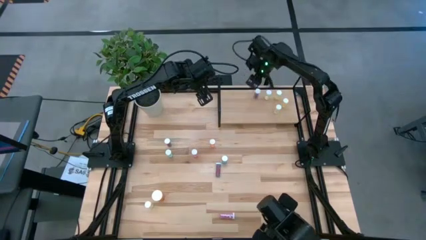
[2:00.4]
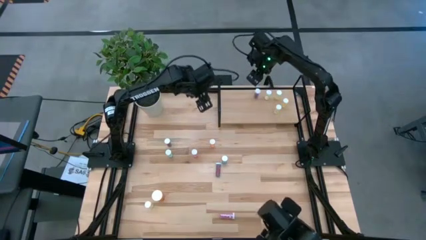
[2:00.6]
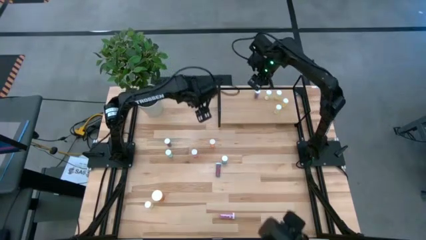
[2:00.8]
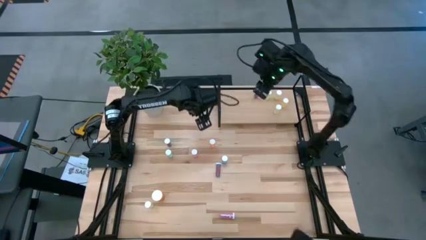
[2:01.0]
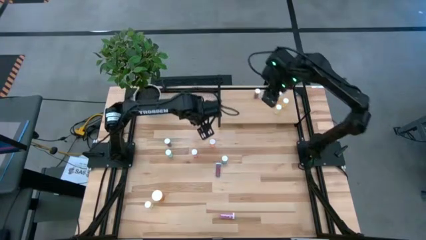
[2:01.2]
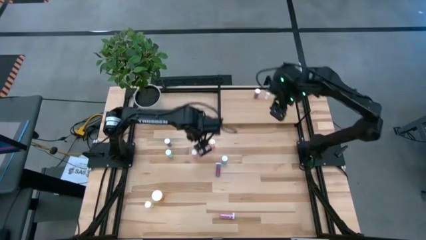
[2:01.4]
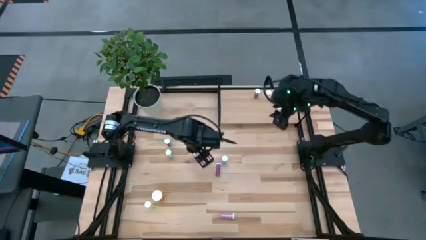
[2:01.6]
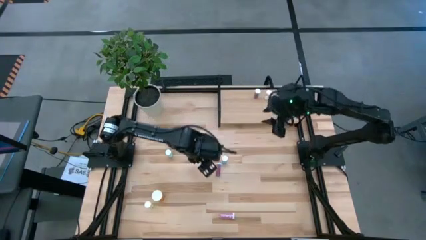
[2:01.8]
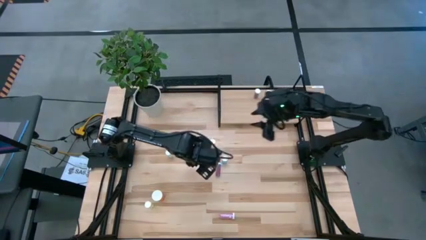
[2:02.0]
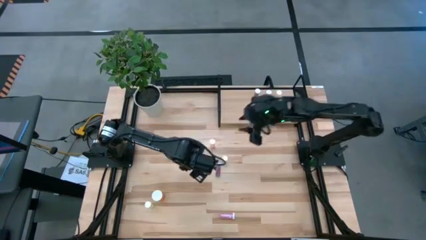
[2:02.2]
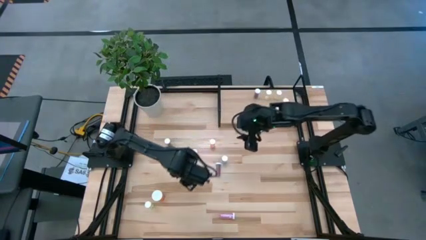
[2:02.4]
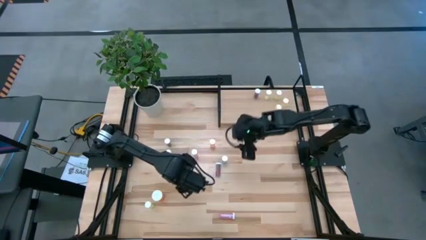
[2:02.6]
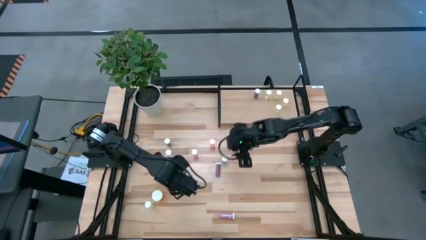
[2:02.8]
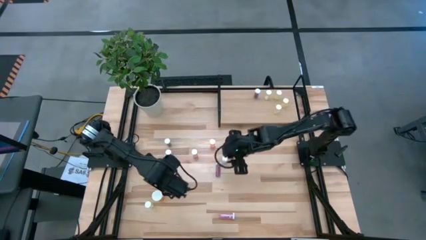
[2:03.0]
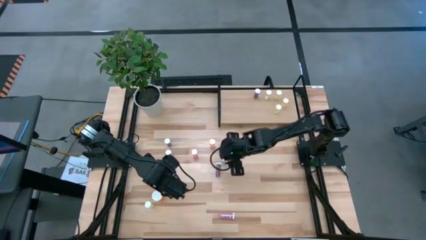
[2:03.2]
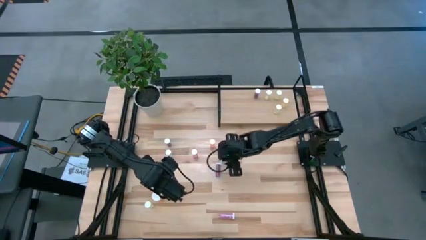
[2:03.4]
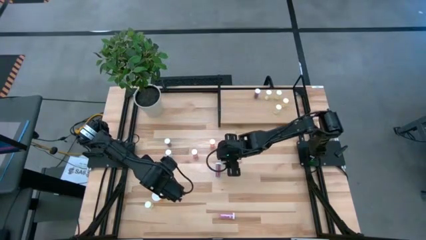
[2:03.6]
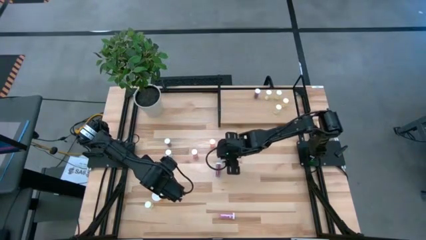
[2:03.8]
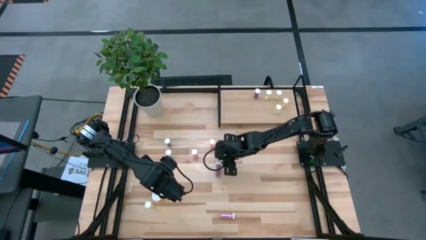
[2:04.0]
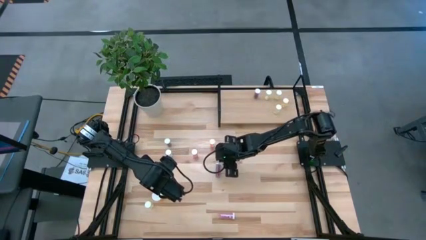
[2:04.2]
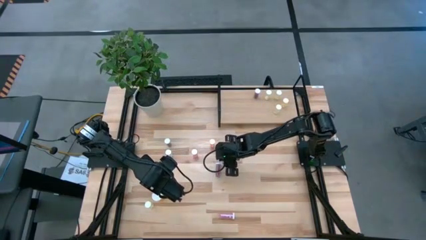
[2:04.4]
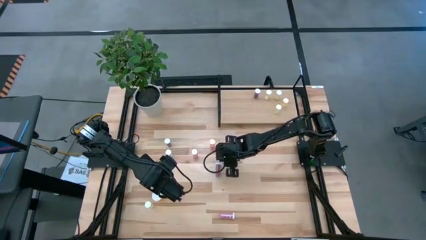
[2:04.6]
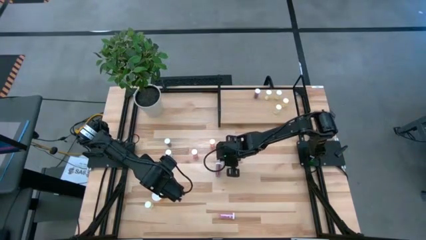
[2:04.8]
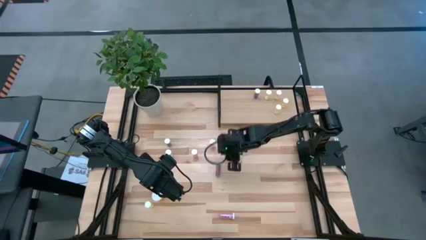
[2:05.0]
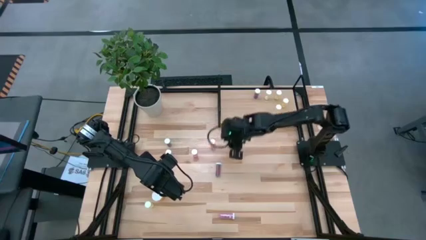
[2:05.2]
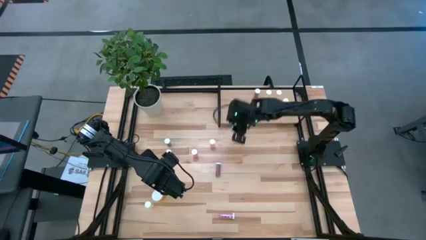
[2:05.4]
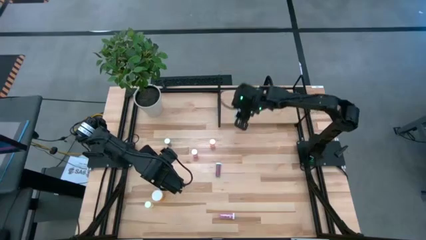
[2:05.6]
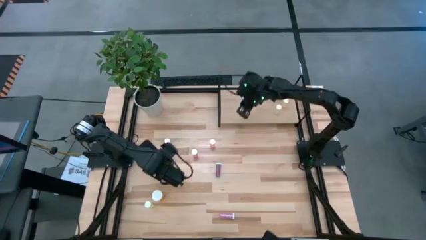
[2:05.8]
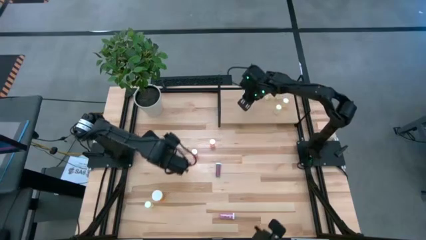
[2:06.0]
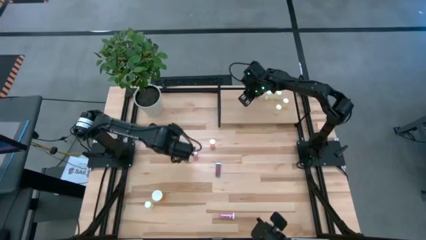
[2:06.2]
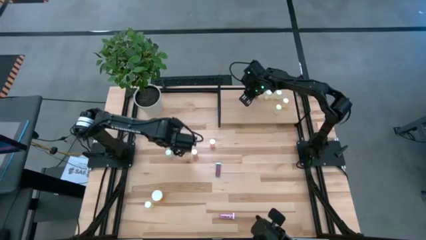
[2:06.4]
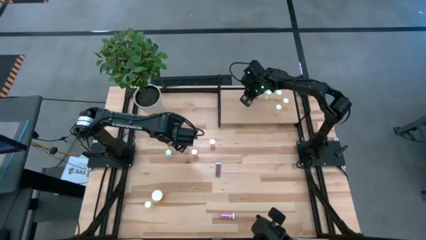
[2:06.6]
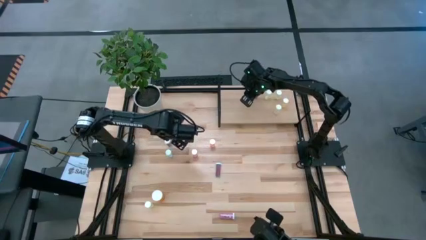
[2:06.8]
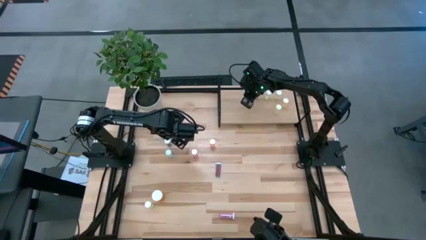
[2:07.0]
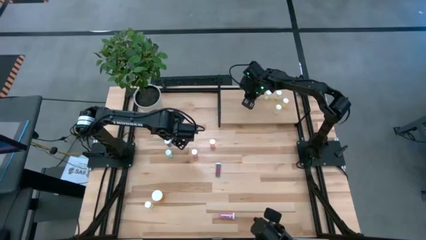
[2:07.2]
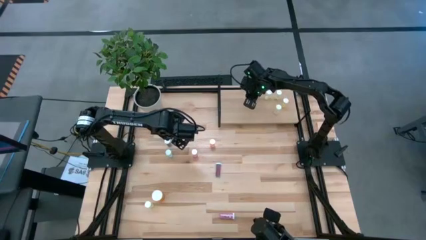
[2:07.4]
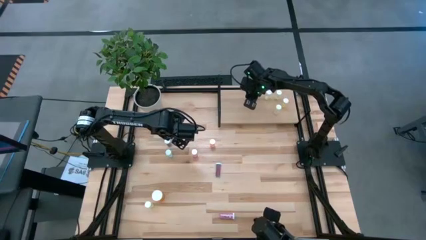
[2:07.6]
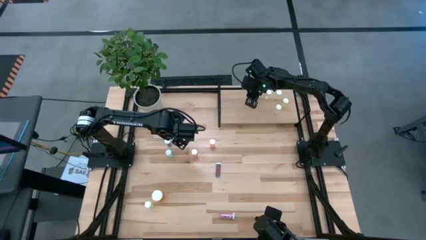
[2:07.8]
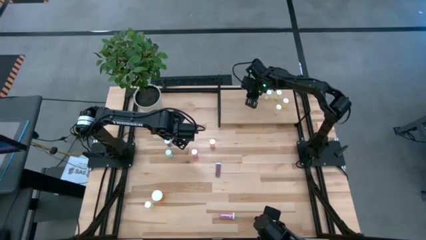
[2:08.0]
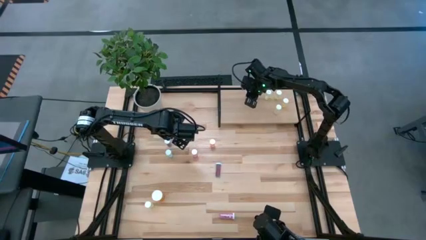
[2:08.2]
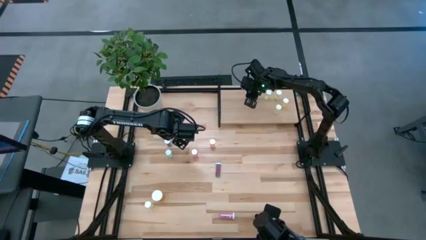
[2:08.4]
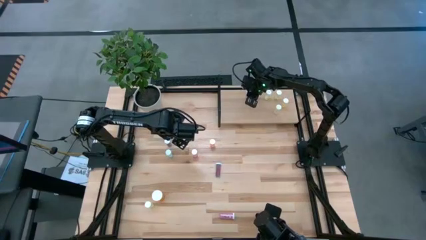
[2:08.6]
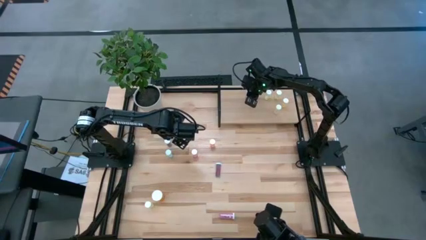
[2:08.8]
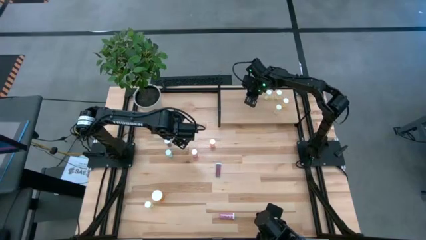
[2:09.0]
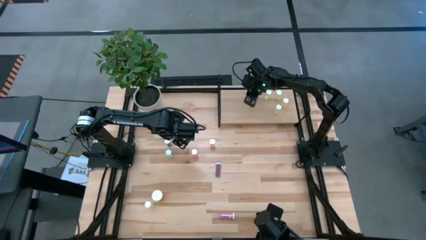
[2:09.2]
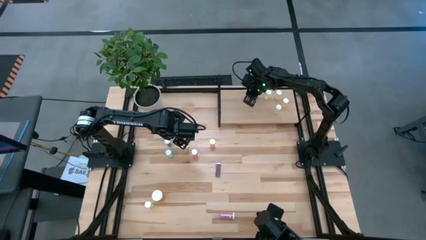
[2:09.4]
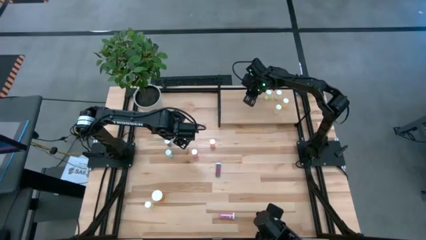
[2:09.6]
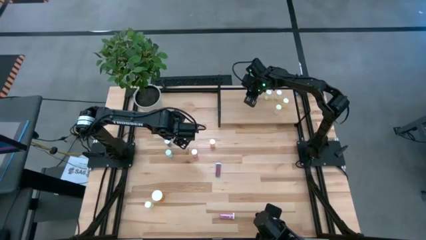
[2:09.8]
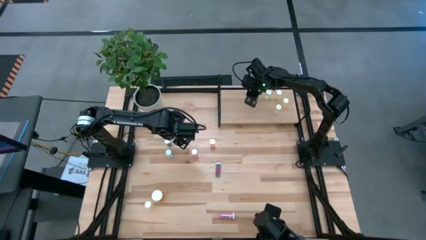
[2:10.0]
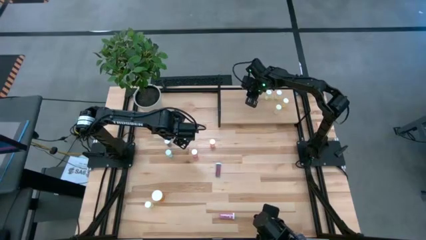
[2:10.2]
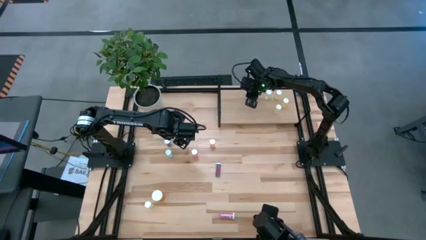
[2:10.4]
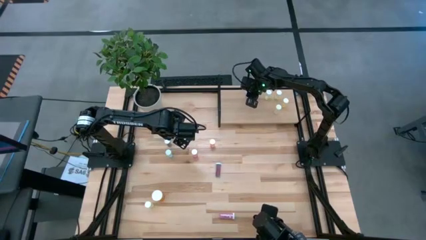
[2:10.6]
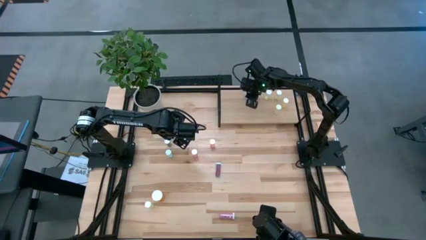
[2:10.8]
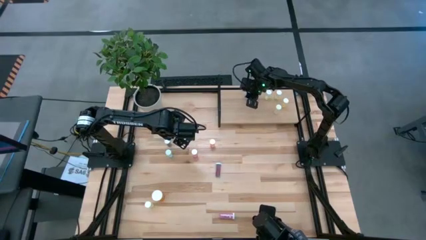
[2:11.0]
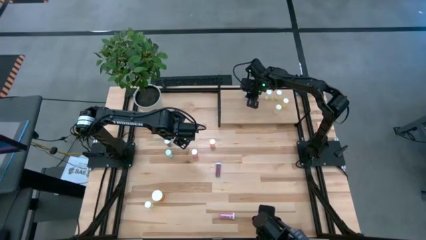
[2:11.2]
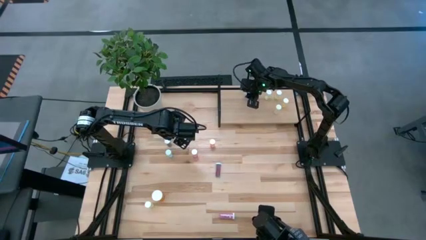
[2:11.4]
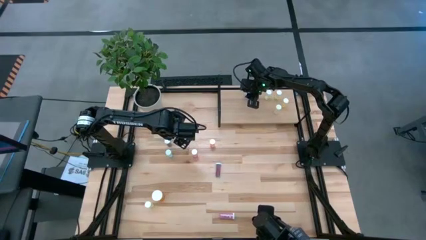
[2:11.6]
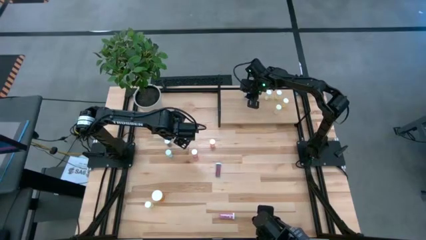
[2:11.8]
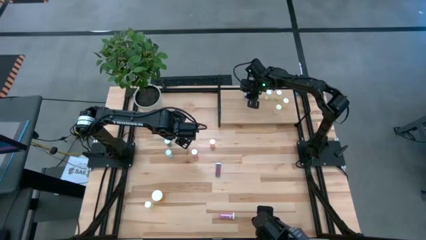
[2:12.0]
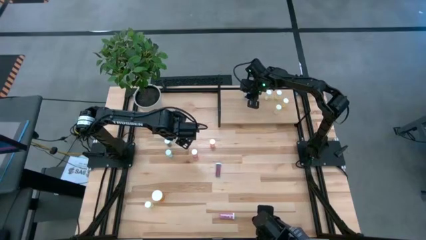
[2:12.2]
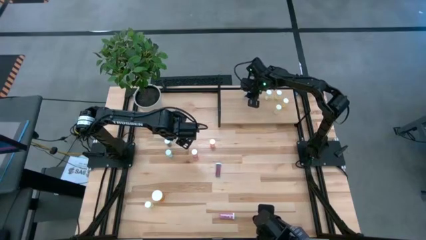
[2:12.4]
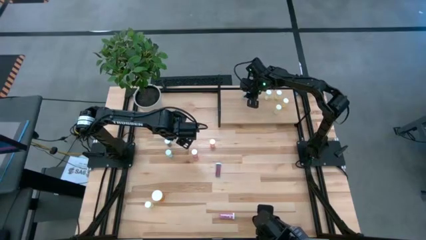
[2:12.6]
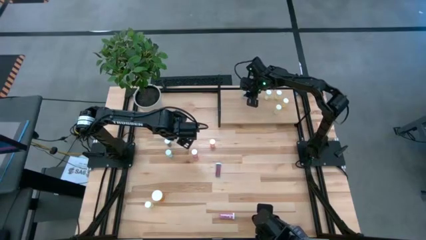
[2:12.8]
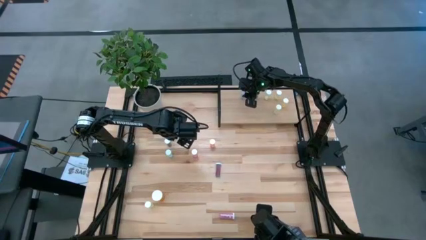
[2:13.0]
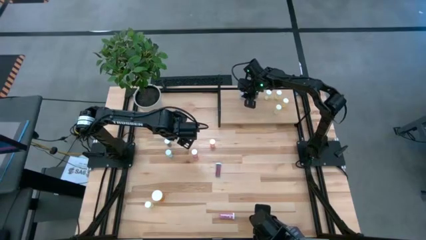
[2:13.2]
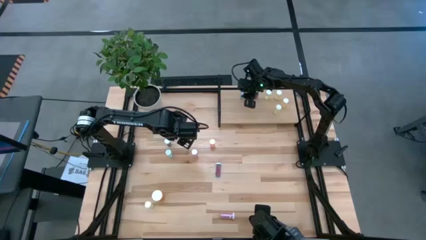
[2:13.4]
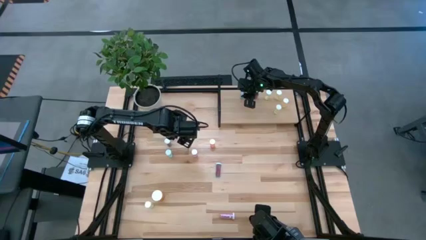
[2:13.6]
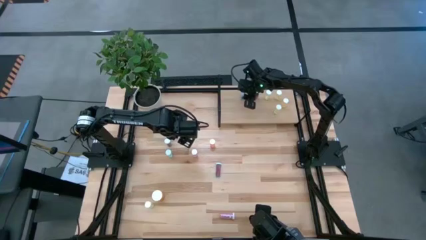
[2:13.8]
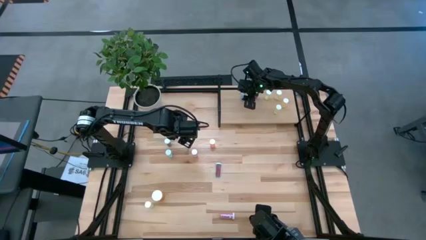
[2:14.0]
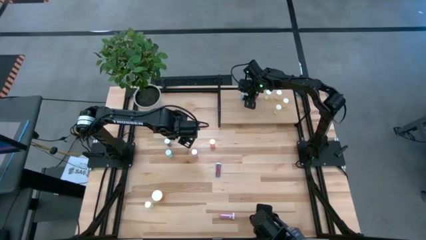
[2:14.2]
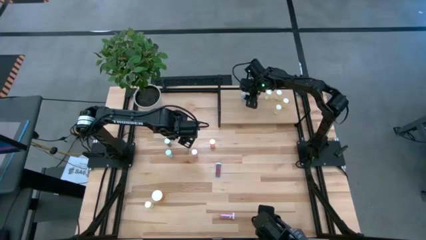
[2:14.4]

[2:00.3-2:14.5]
Task: Pick and place medicine bottles onto shelf by color
Put the blue pill bottle on the shelf

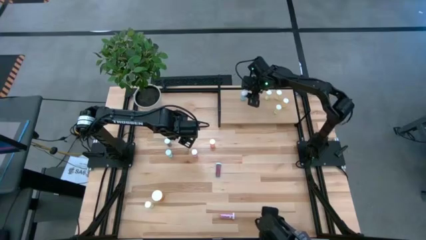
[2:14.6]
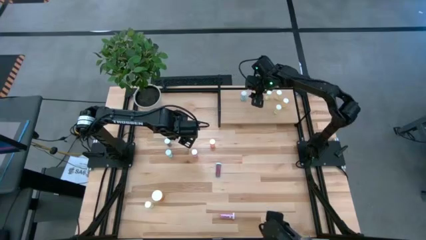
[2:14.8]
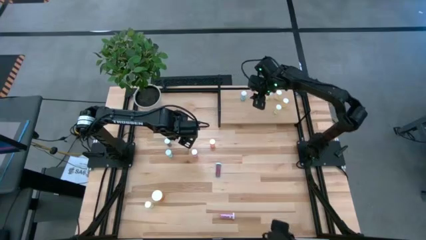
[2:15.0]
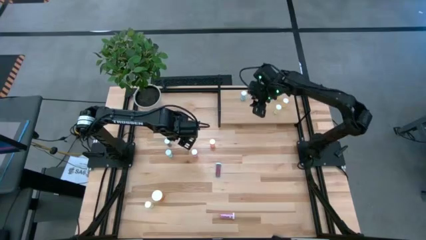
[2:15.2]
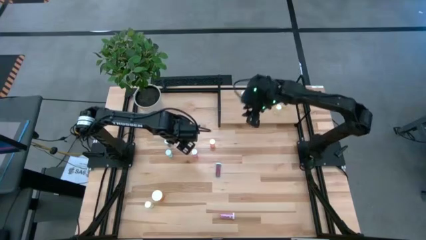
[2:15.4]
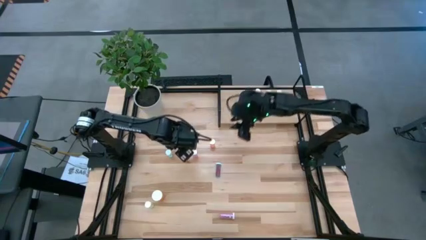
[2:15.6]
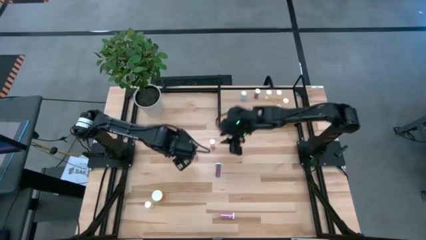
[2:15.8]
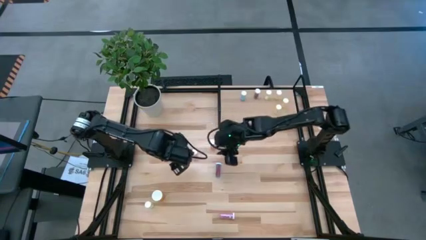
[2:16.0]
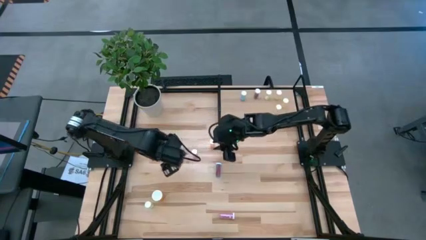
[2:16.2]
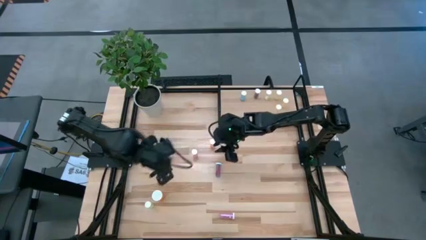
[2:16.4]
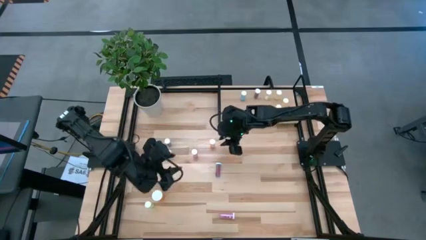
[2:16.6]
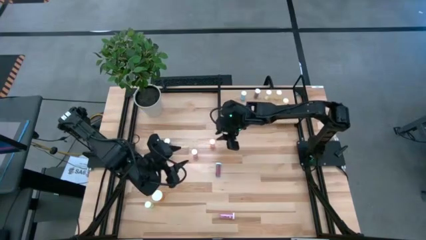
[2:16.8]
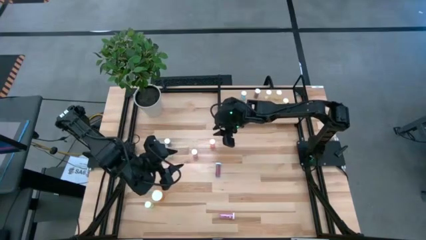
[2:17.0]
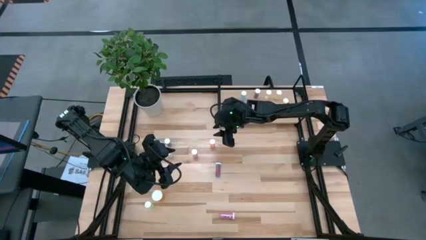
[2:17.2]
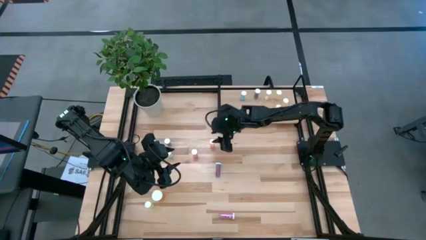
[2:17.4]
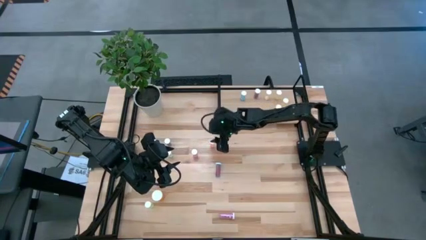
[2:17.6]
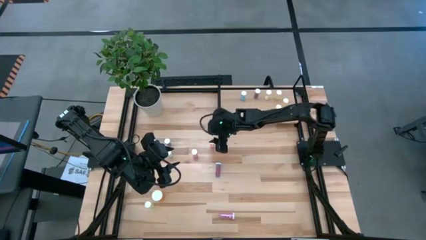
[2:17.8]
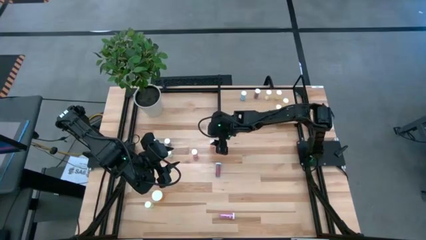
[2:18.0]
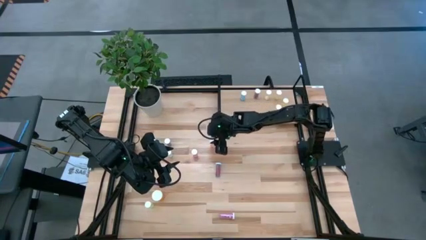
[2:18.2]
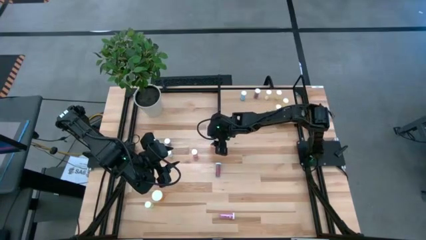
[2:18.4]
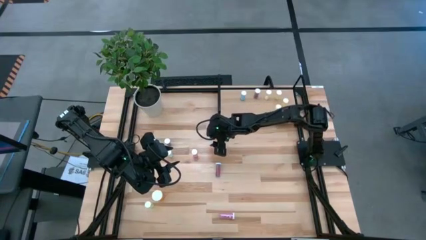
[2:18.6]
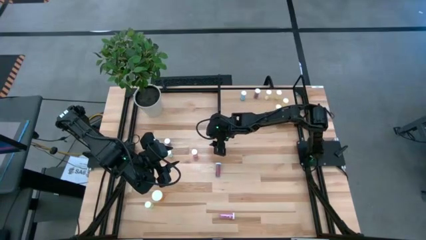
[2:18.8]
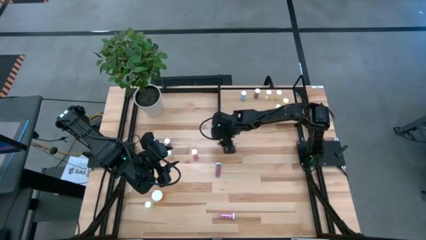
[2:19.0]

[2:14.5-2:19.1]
Put the top orange pill bottle on the shelf
